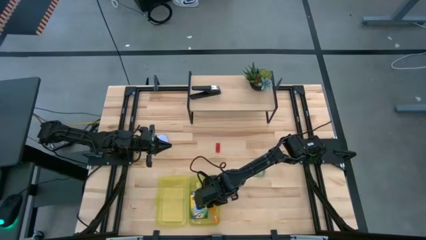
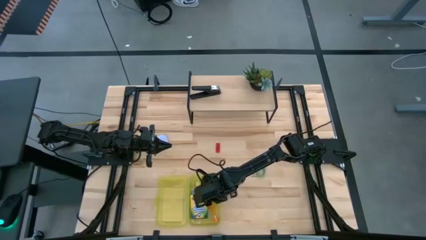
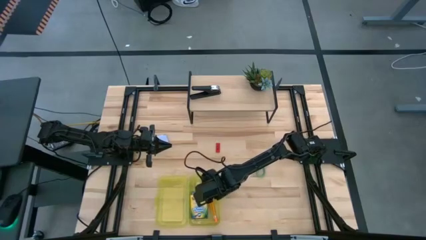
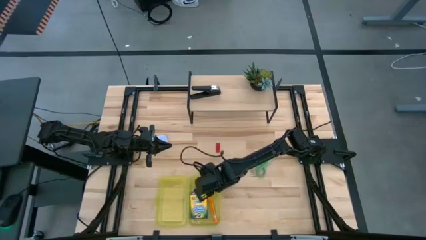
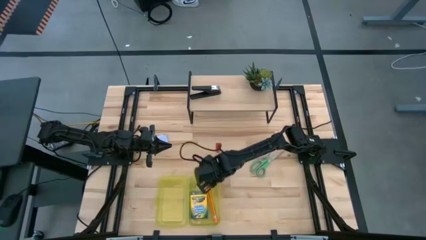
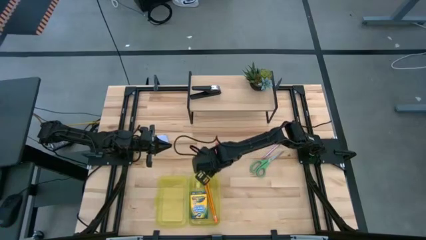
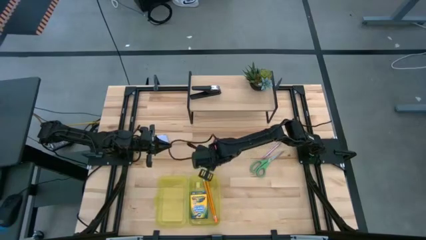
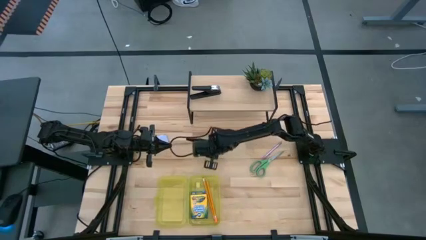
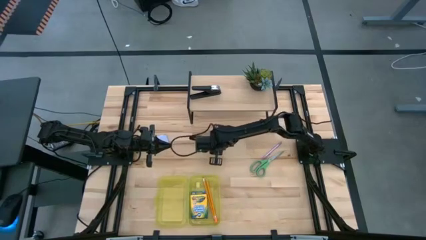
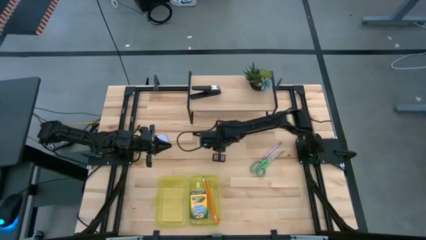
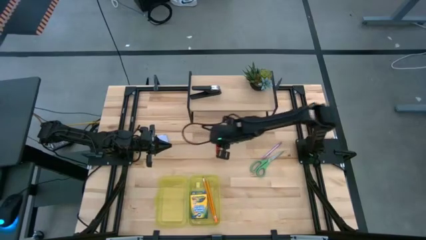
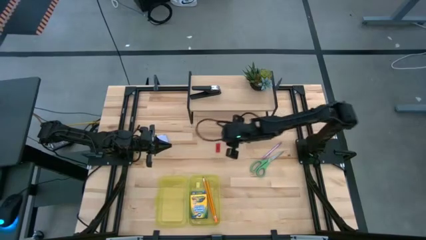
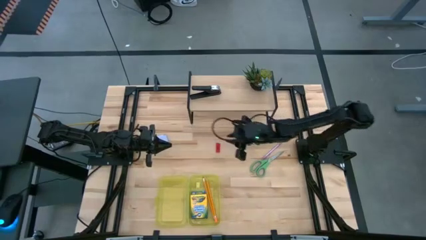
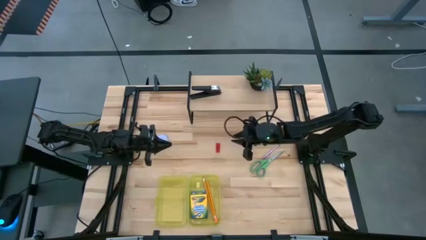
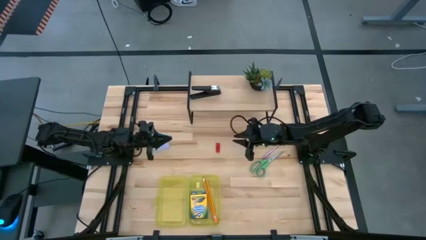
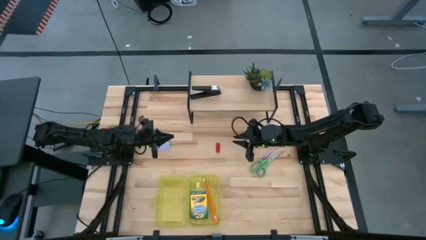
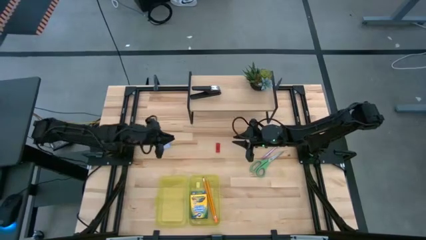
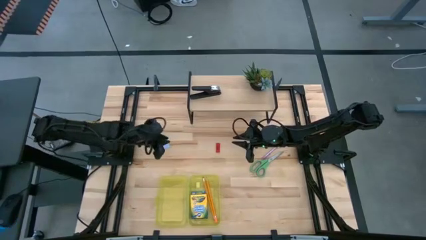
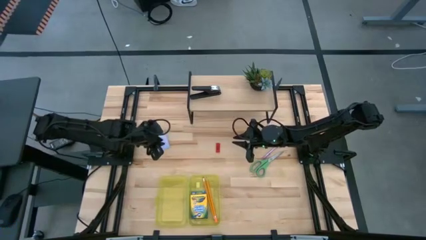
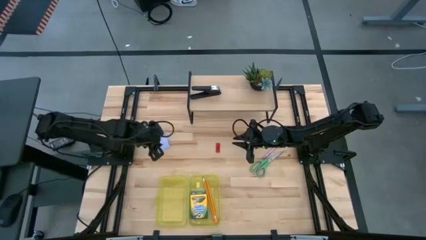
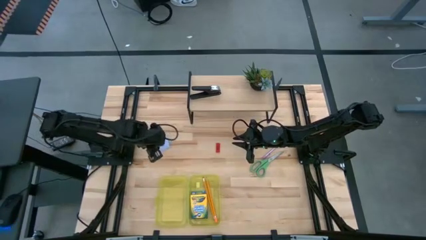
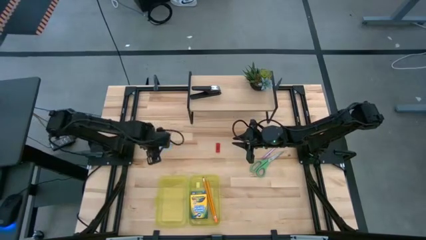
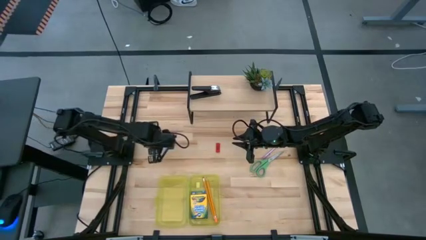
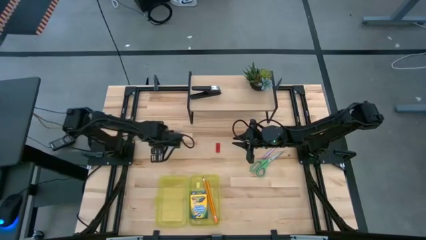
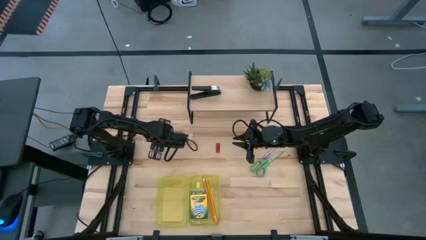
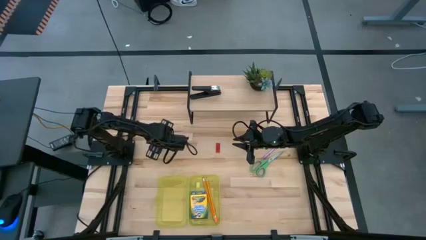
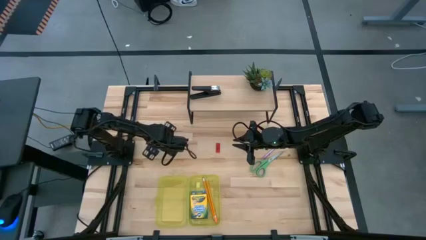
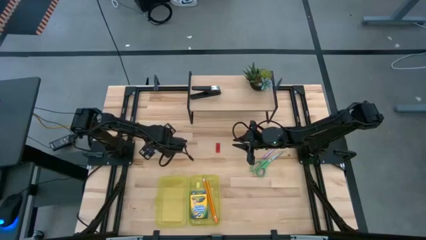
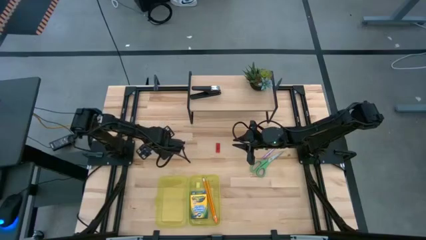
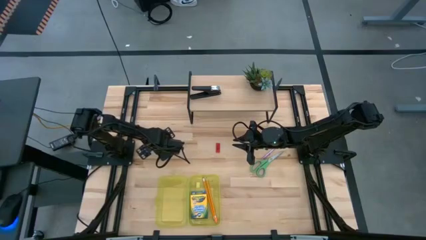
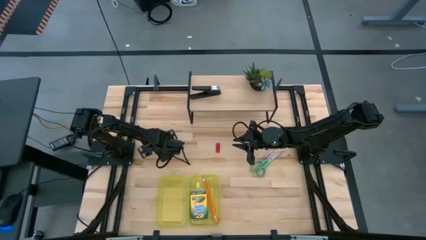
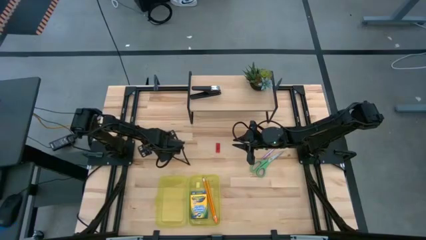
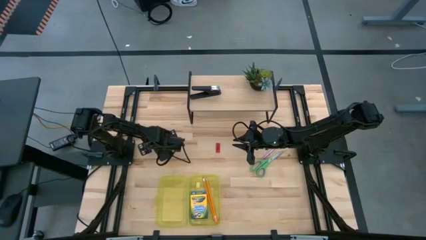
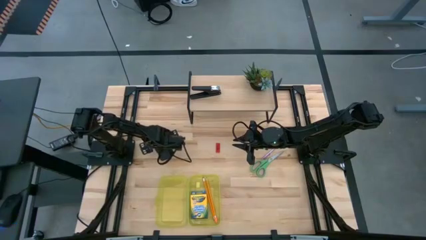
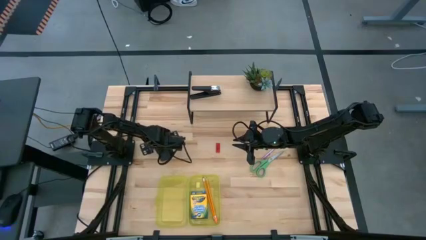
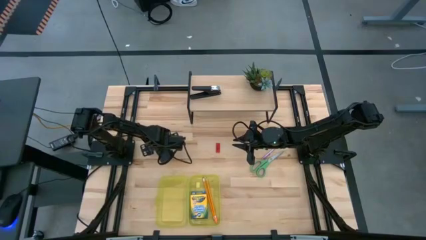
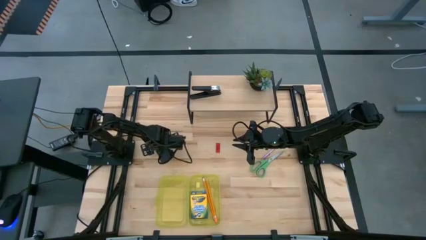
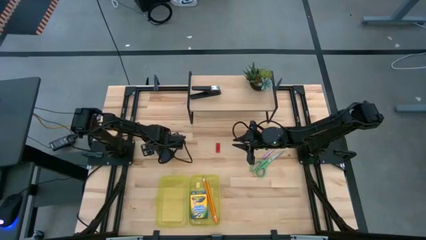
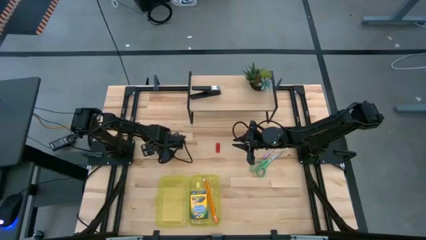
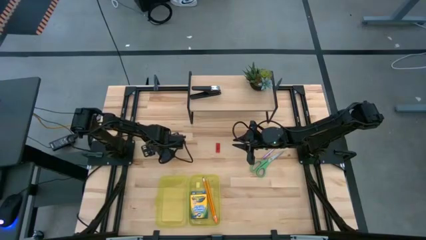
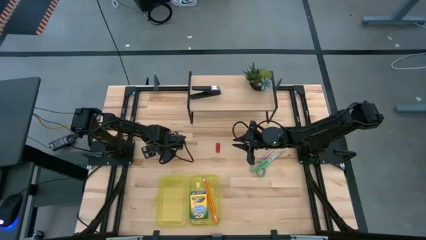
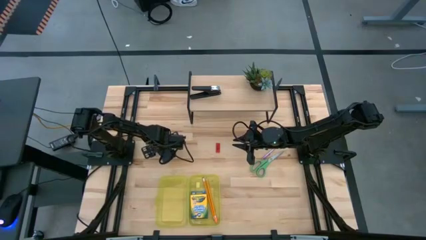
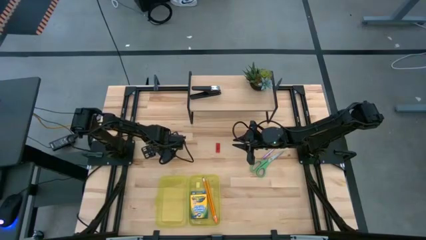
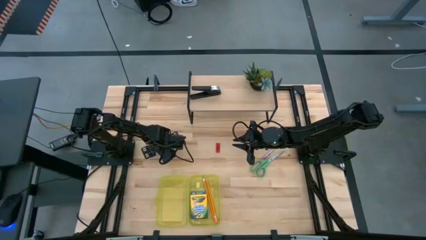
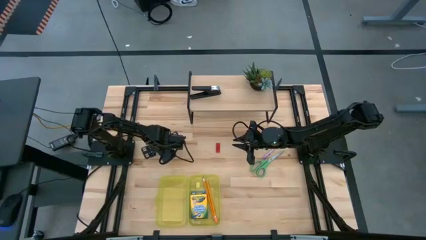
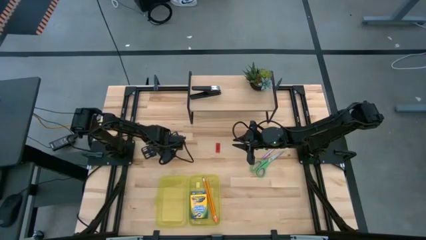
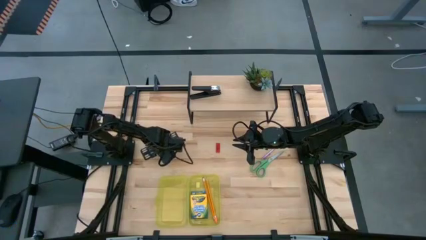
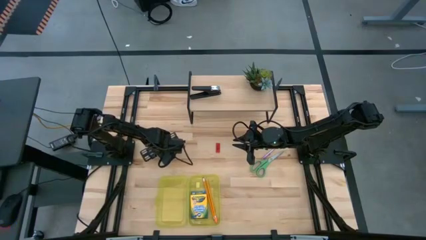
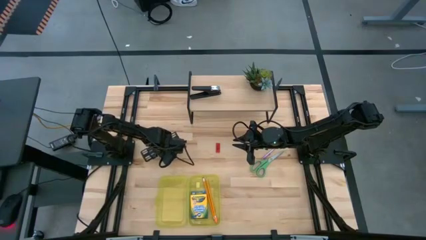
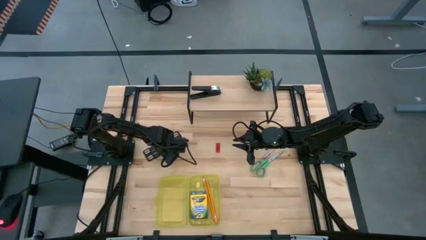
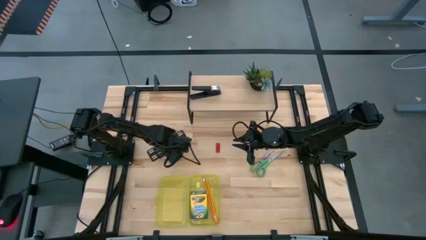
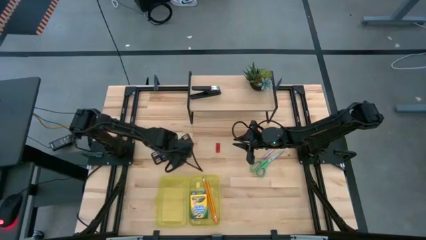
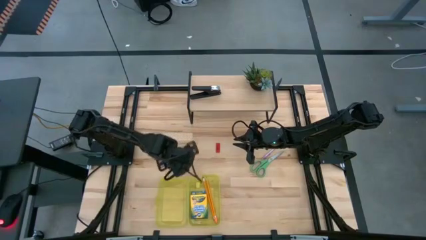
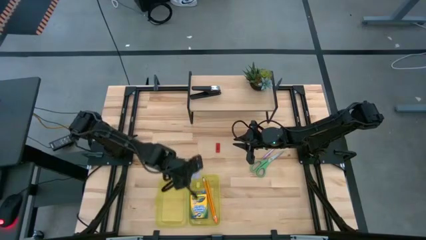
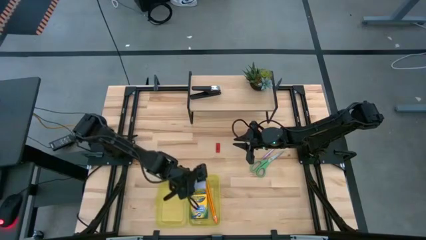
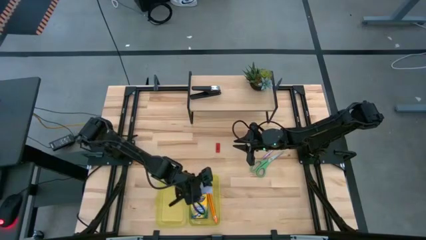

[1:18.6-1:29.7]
Task: Pack school essentials
Put the blue sticky note into the yellow supply box
